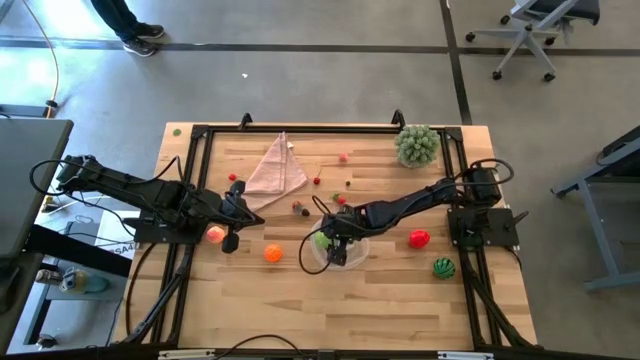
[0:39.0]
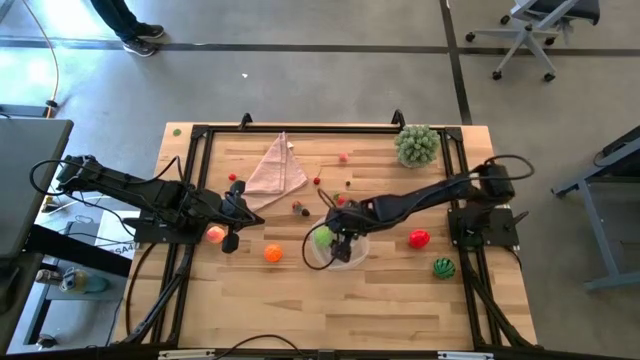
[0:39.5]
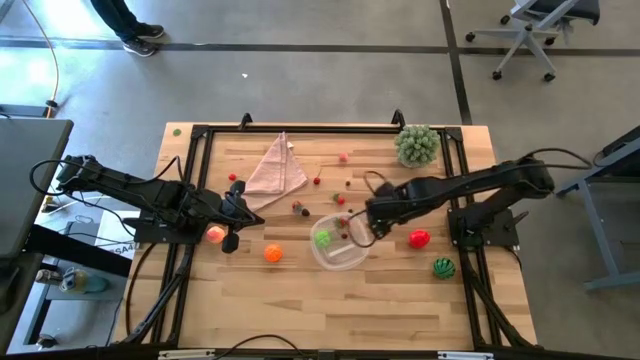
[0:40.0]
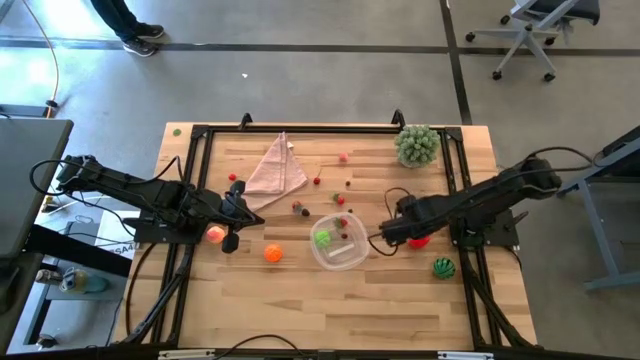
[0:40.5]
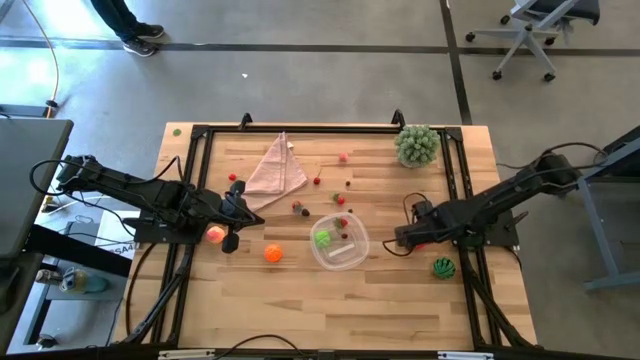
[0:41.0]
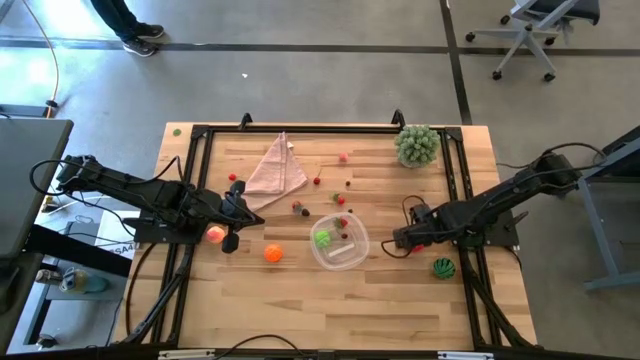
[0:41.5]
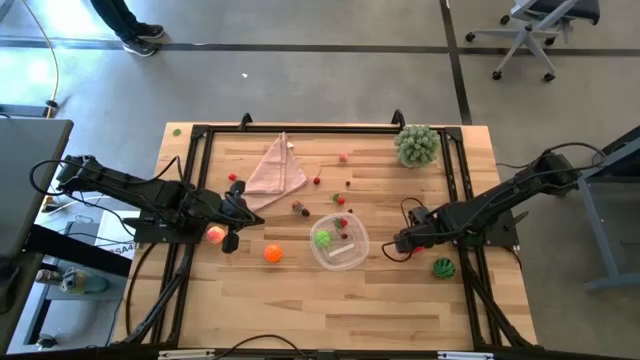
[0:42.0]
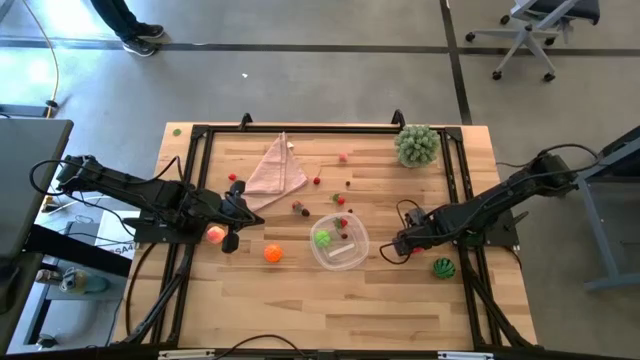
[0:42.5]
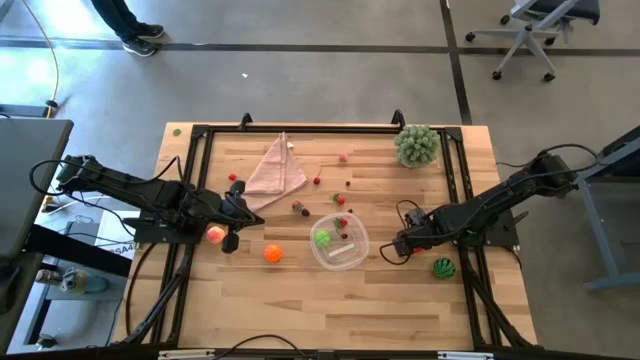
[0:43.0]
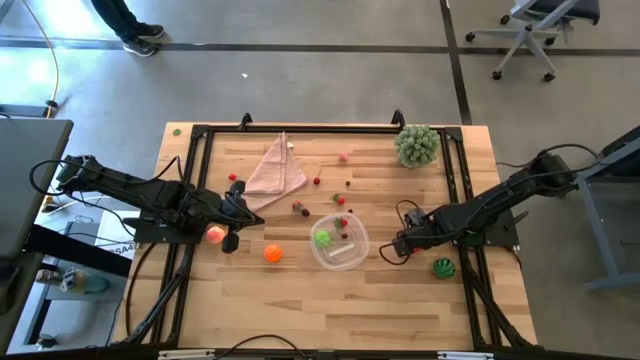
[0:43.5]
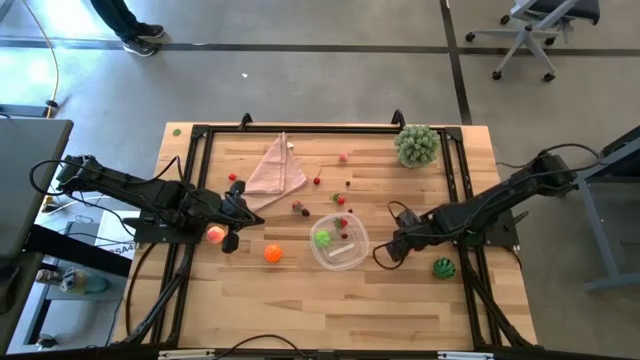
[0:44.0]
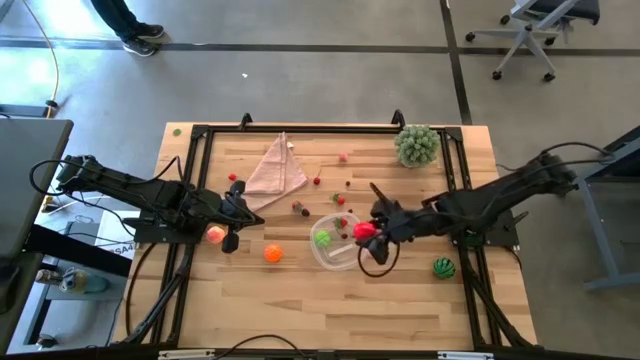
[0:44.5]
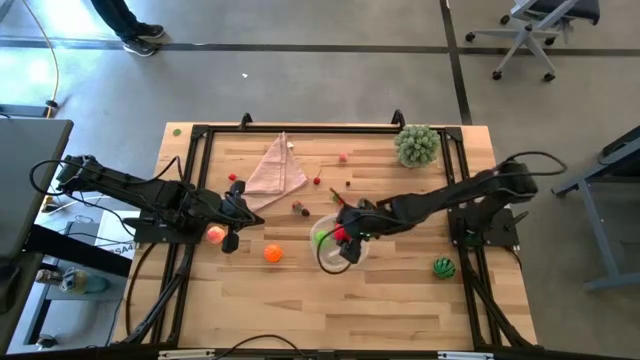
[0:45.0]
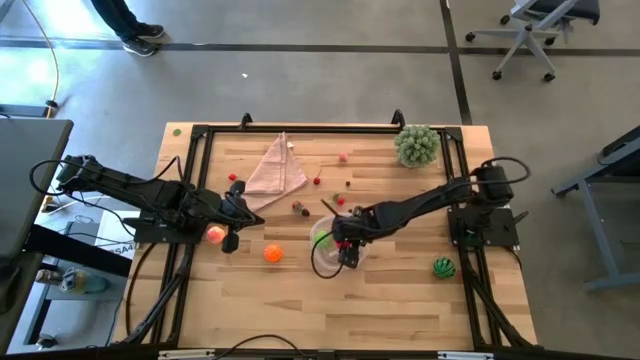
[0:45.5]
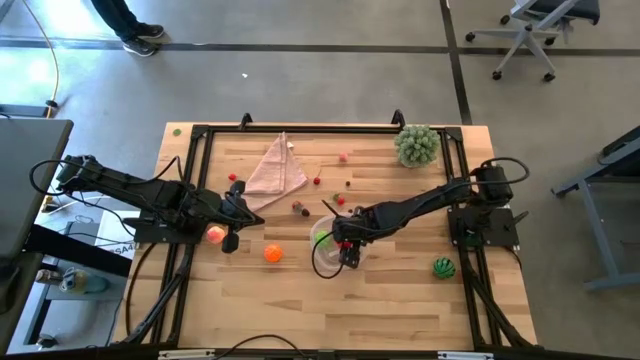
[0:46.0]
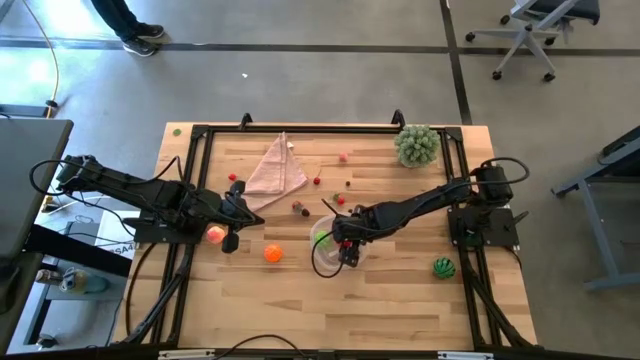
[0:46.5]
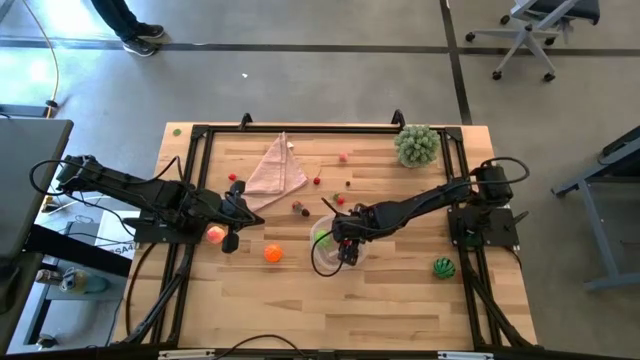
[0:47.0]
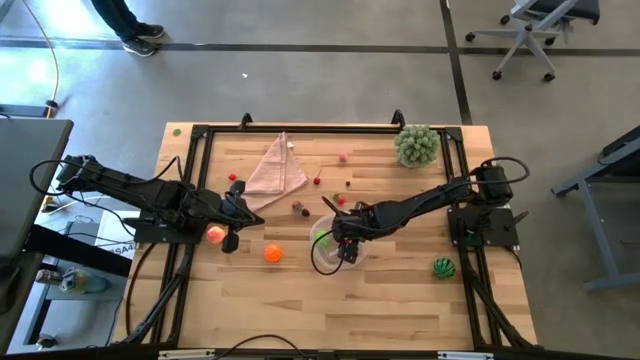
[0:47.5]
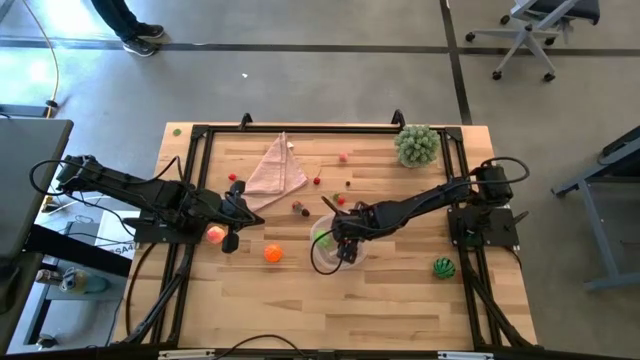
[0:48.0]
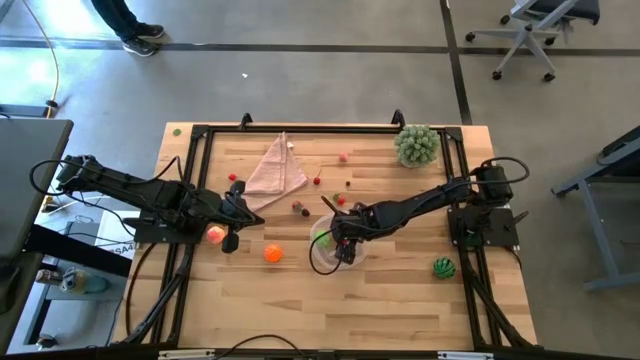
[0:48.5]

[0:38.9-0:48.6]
Task: Pick and placing Produce into tupperware
Put the red apple into the transparent bin

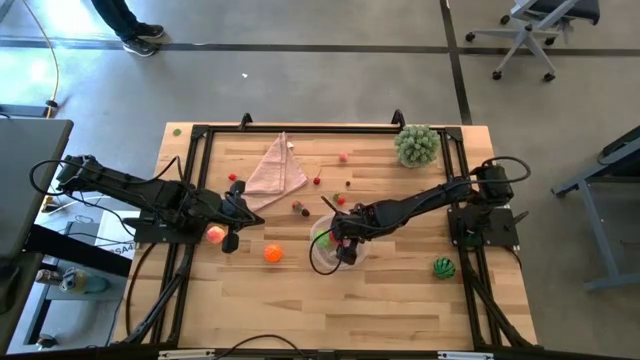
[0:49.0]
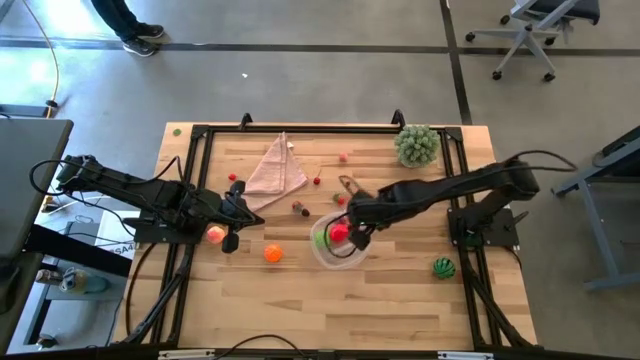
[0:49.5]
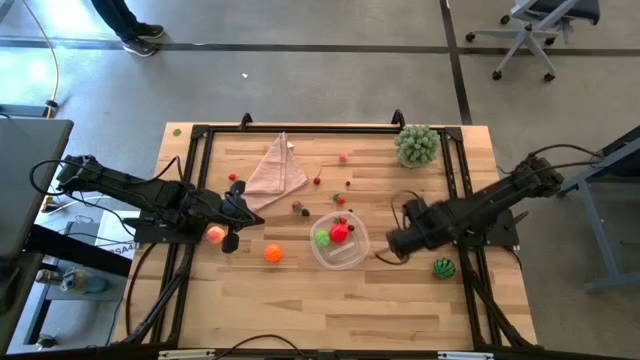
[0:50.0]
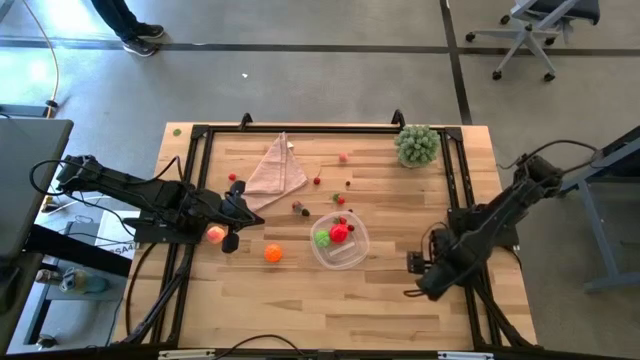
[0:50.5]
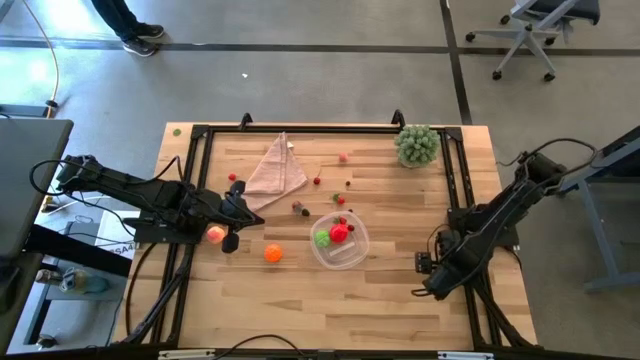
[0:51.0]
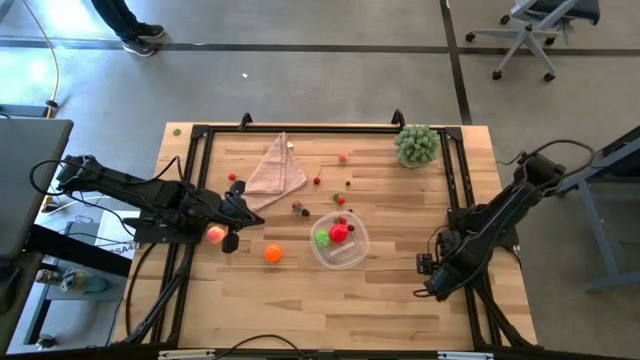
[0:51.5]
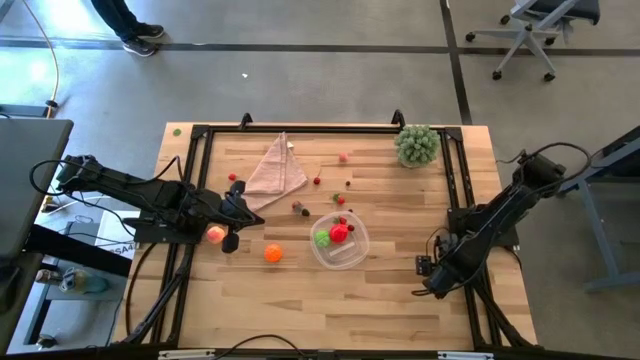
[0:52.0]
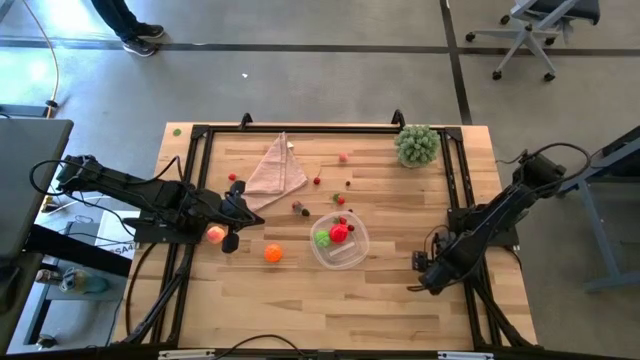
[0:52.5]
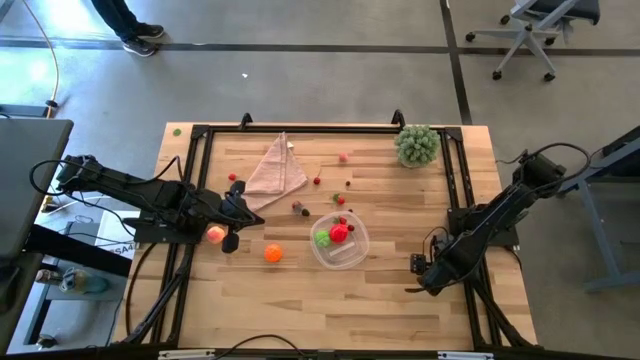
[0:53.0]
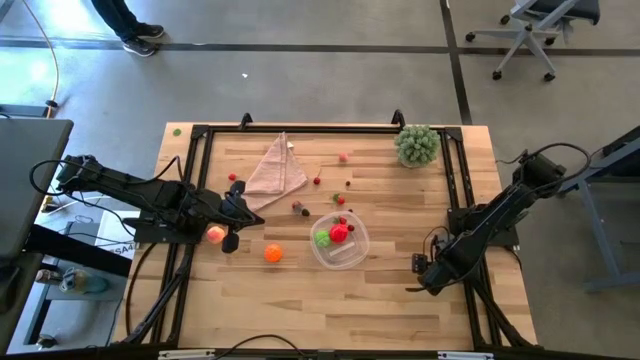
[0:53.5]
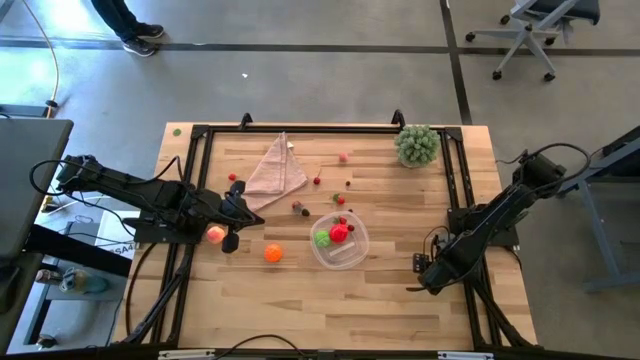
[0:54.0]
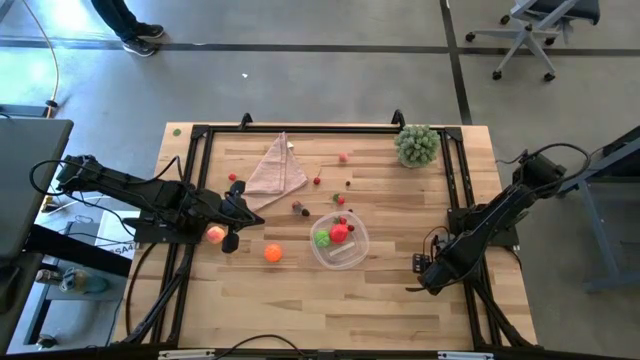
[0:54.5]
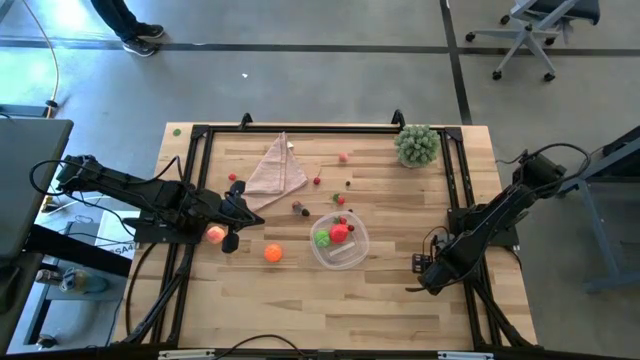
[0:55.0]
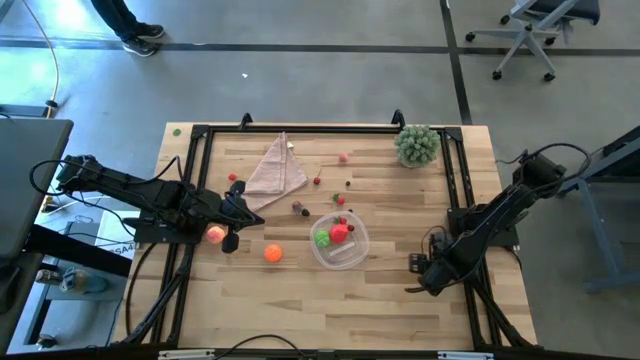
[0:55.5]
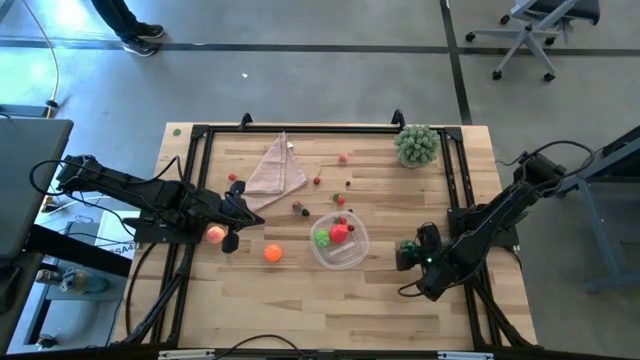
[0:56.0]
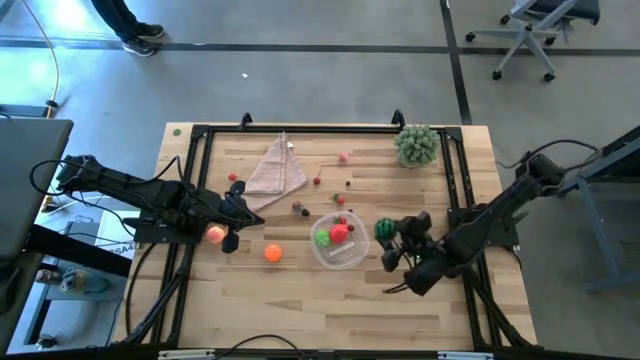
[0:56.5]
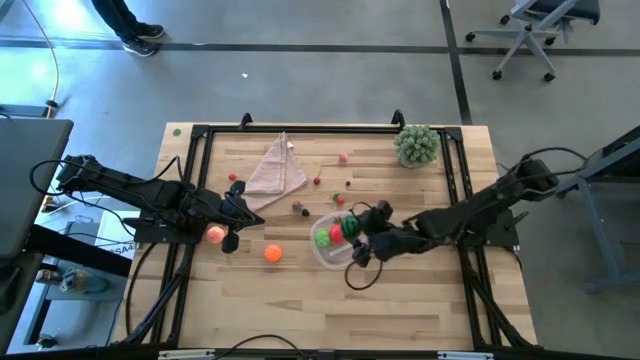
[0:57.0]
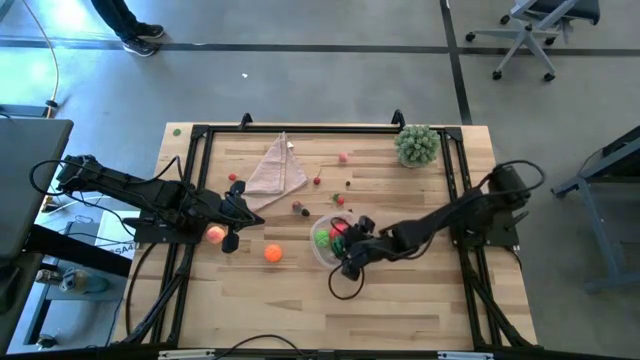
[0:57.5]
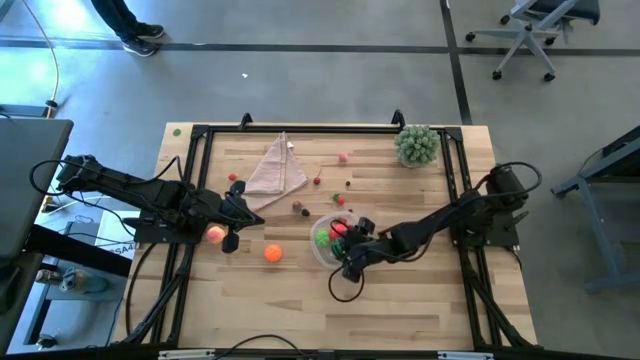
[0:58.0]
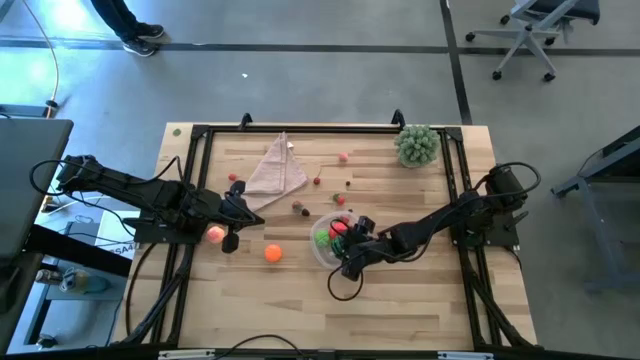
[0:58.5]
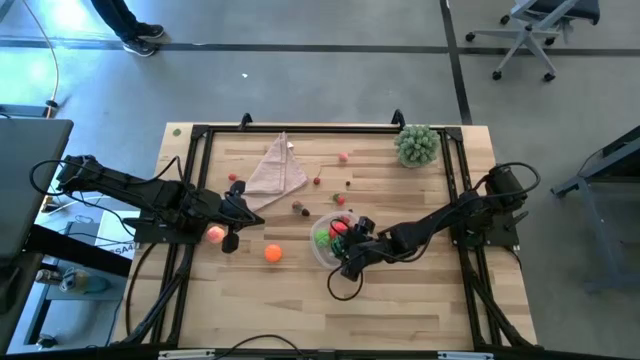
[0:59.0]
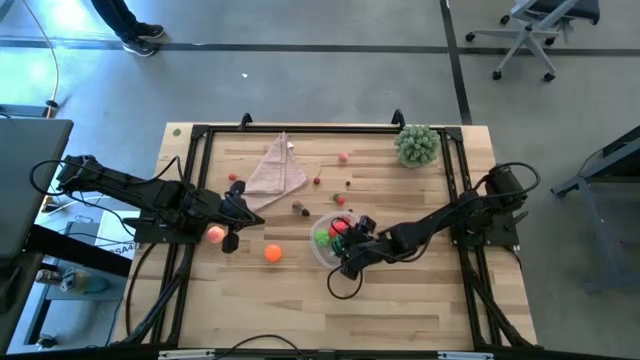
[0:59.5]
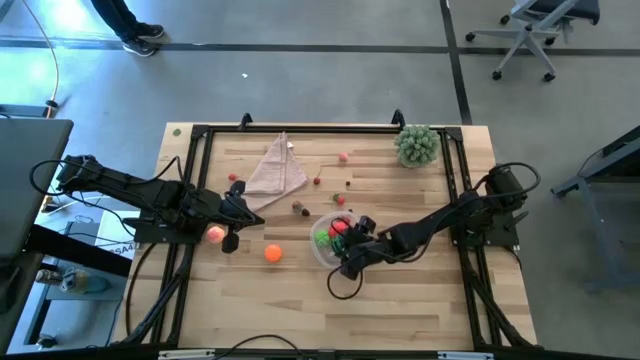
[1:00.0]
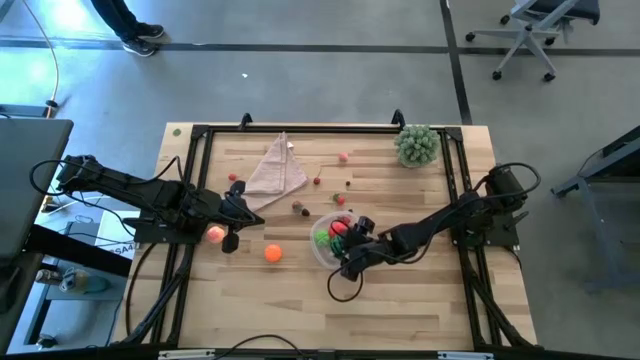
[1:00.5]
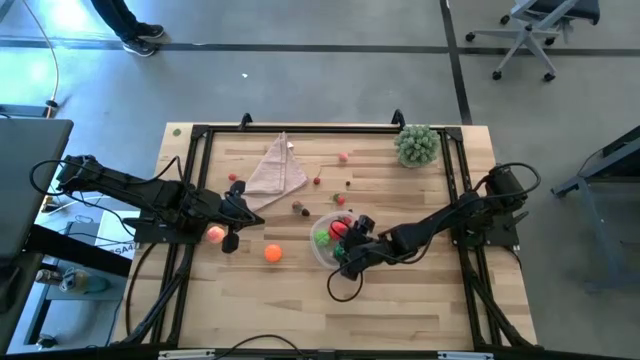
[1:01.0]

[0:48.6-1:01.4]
Put the green watermelon into the transparent bin
